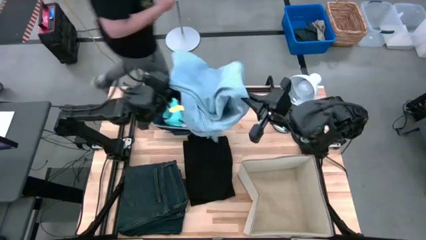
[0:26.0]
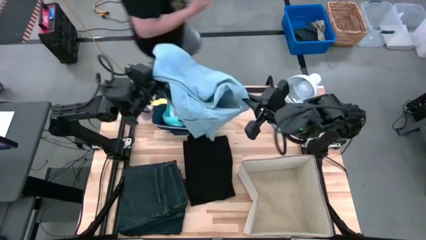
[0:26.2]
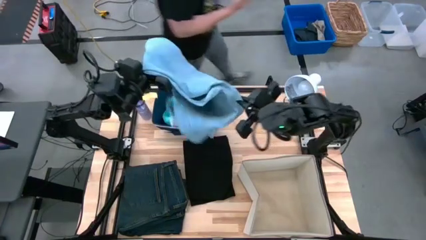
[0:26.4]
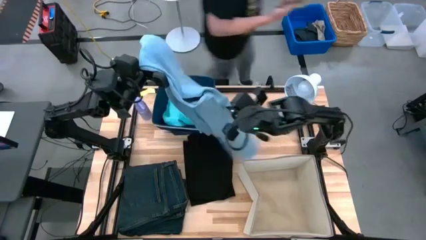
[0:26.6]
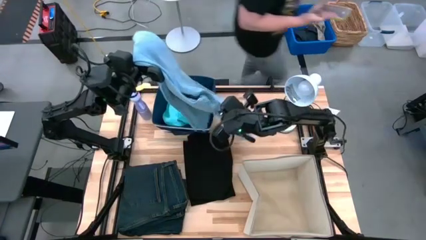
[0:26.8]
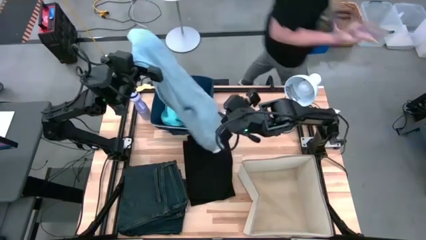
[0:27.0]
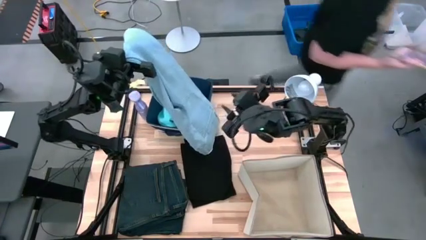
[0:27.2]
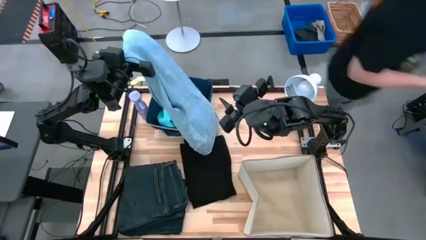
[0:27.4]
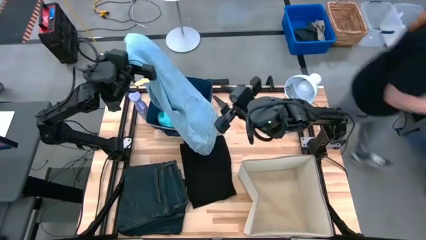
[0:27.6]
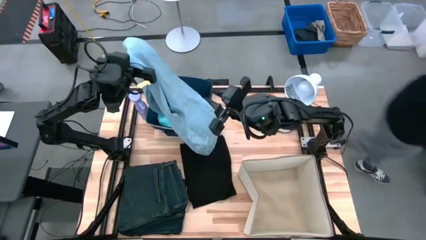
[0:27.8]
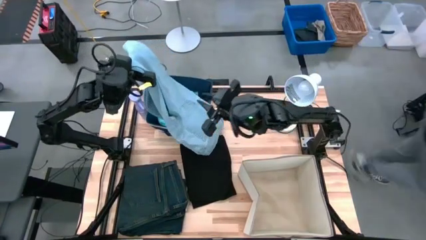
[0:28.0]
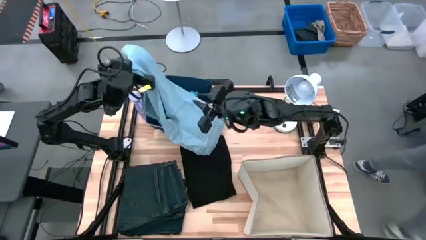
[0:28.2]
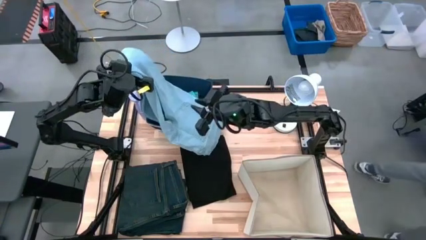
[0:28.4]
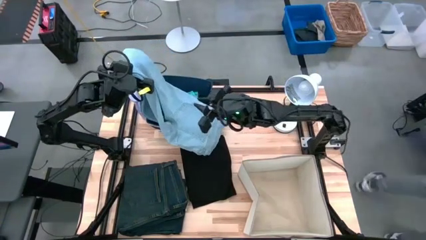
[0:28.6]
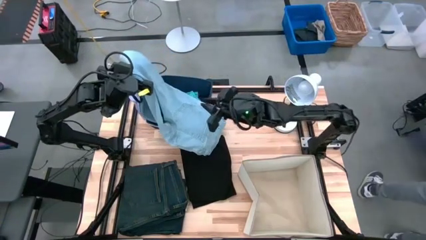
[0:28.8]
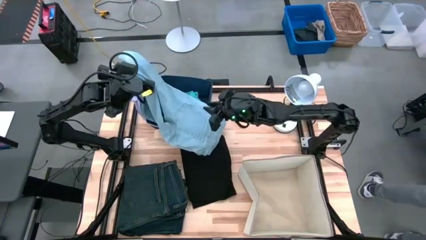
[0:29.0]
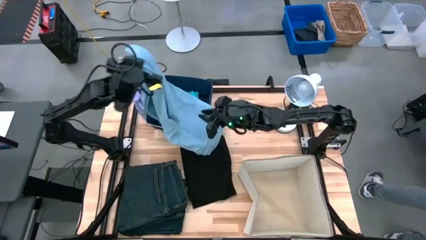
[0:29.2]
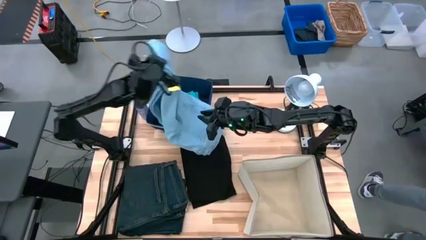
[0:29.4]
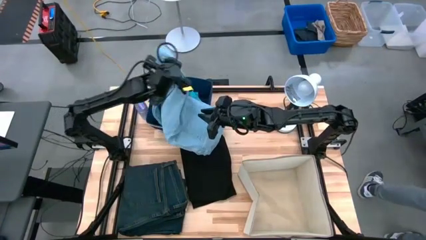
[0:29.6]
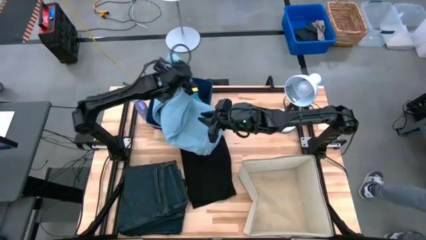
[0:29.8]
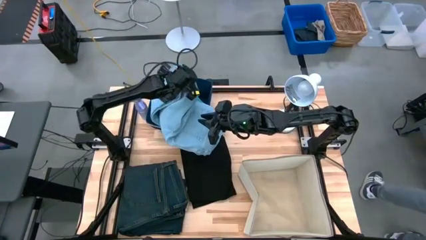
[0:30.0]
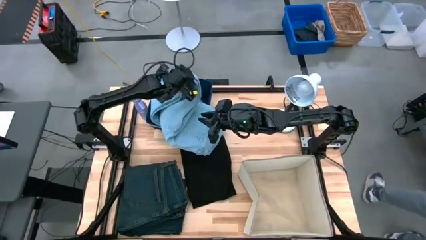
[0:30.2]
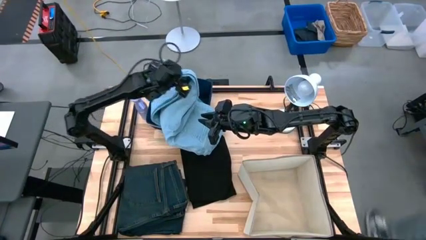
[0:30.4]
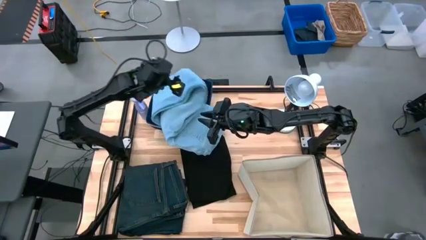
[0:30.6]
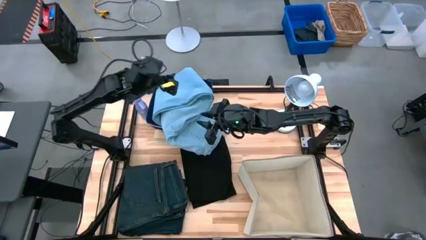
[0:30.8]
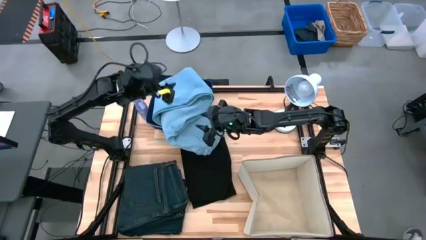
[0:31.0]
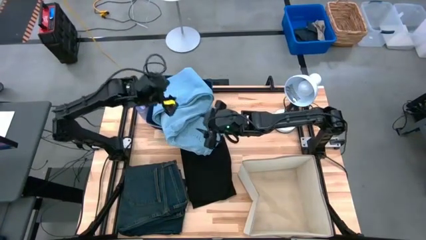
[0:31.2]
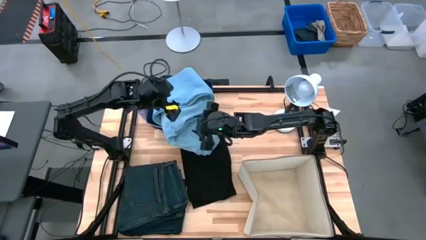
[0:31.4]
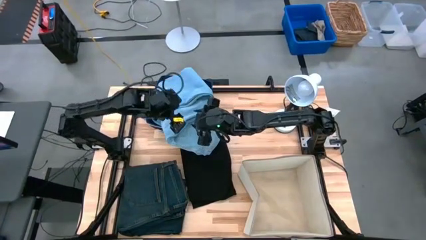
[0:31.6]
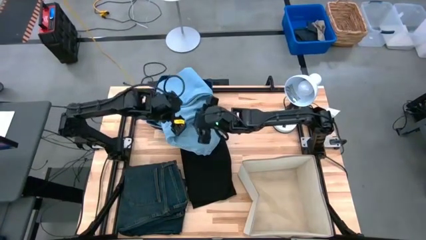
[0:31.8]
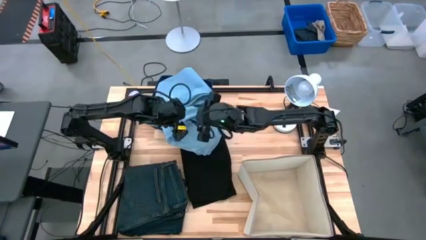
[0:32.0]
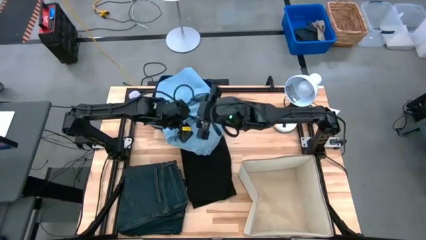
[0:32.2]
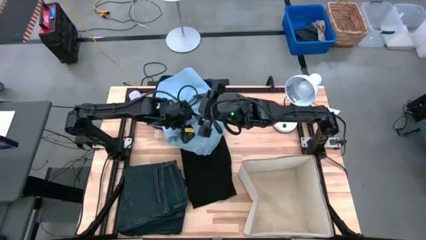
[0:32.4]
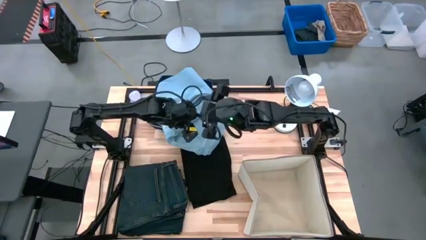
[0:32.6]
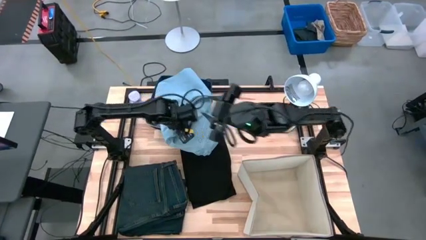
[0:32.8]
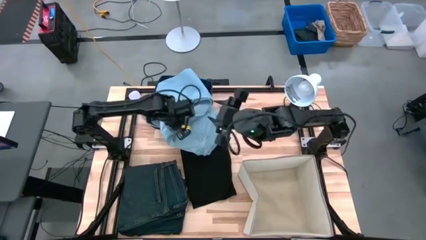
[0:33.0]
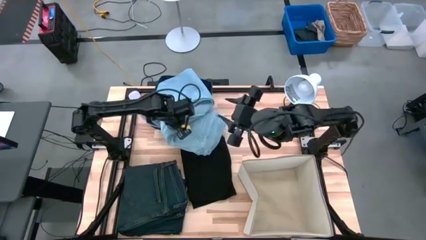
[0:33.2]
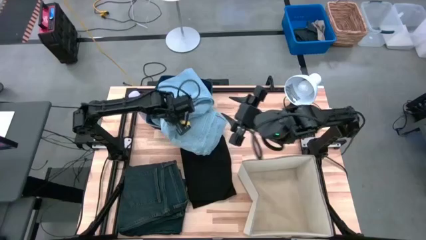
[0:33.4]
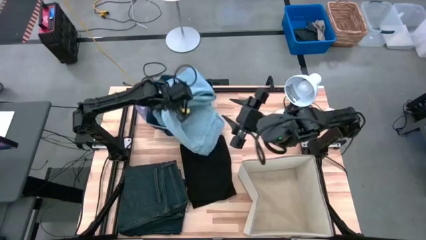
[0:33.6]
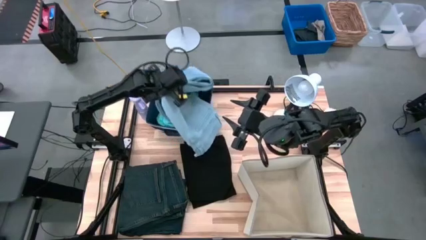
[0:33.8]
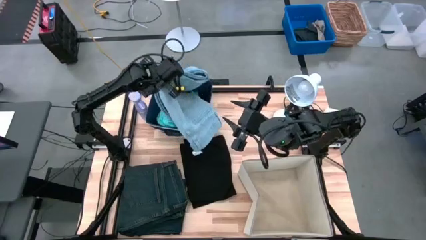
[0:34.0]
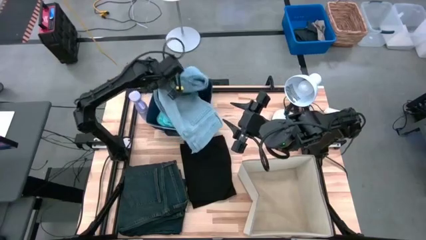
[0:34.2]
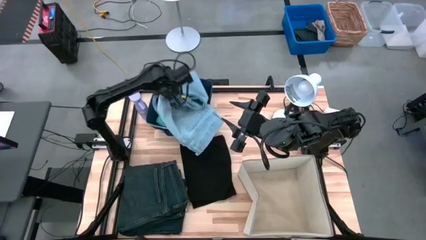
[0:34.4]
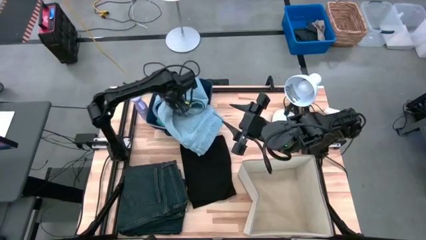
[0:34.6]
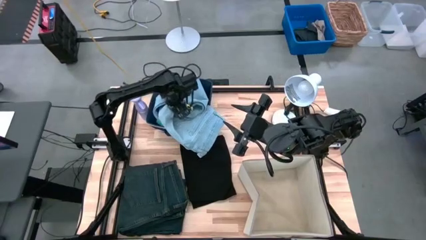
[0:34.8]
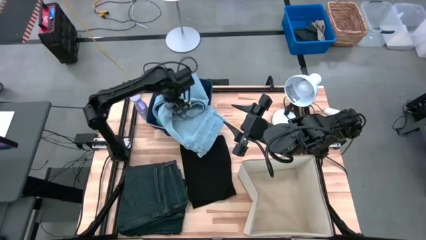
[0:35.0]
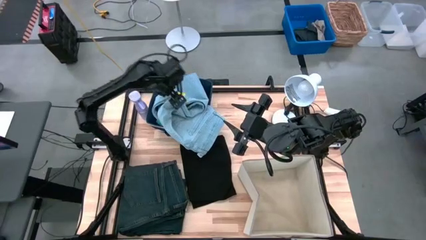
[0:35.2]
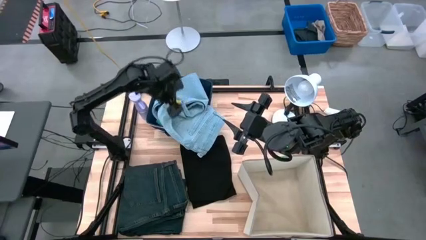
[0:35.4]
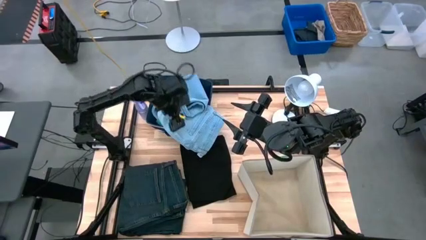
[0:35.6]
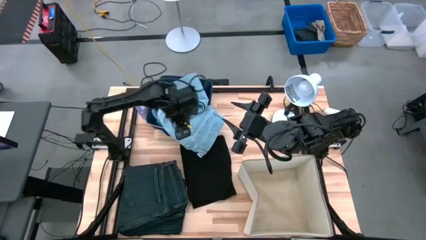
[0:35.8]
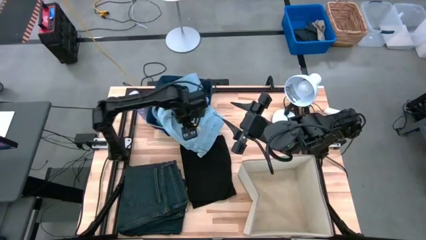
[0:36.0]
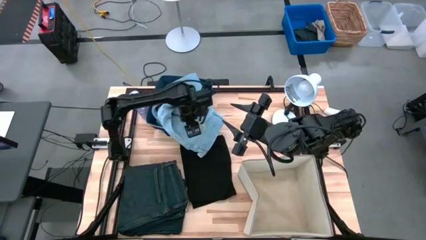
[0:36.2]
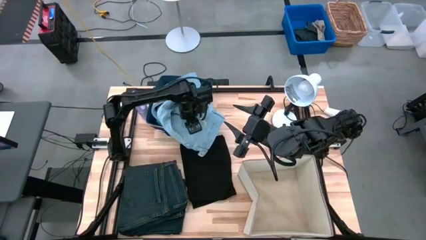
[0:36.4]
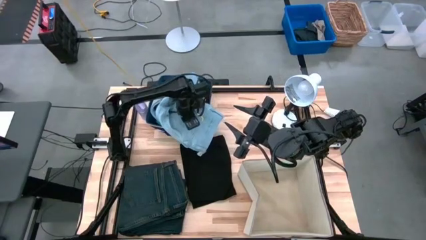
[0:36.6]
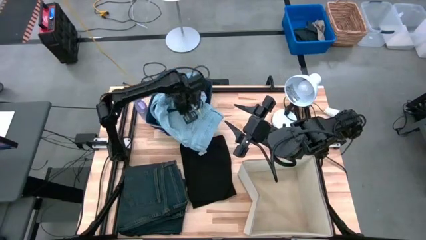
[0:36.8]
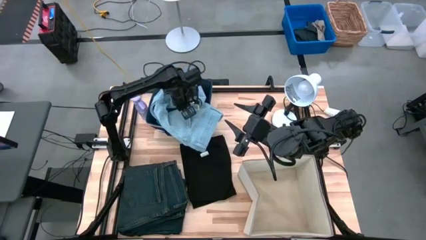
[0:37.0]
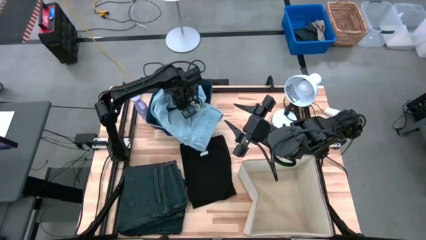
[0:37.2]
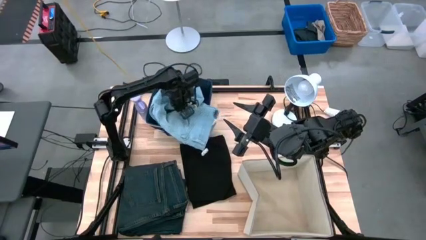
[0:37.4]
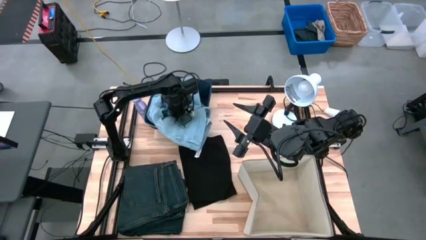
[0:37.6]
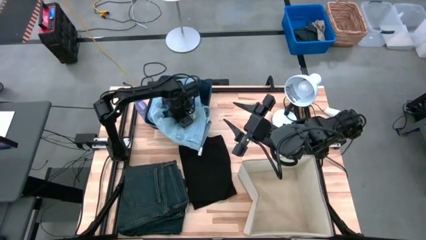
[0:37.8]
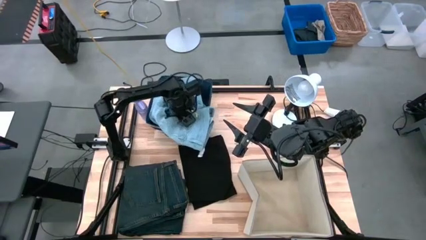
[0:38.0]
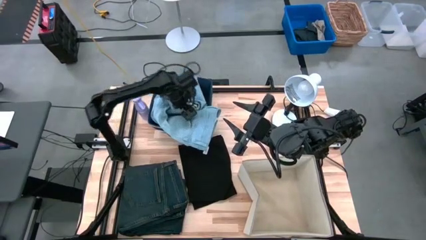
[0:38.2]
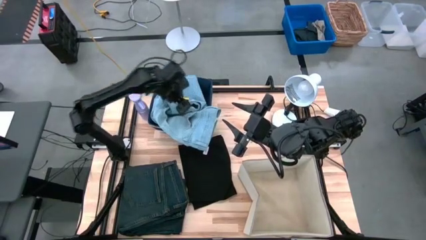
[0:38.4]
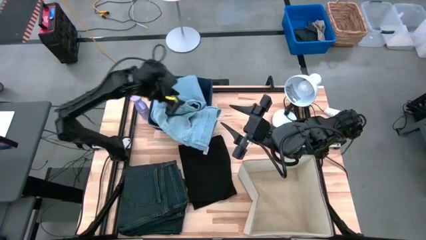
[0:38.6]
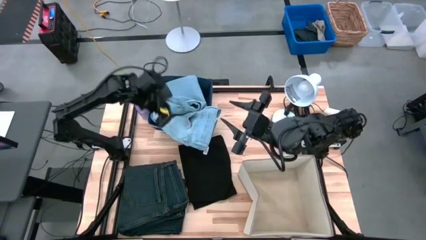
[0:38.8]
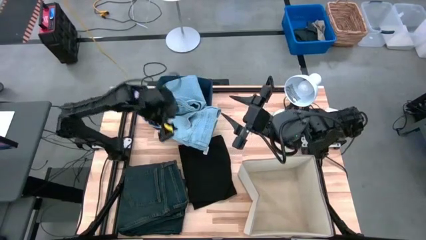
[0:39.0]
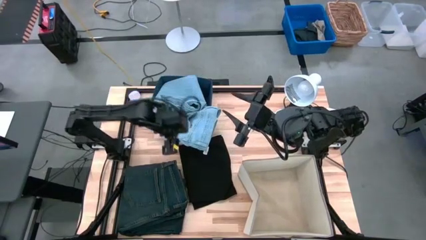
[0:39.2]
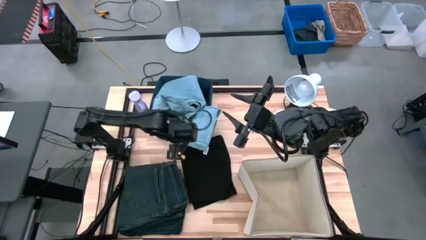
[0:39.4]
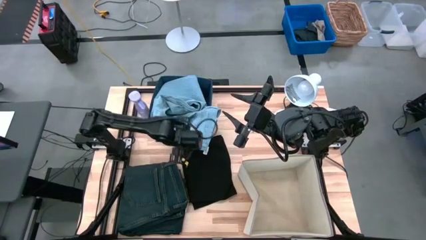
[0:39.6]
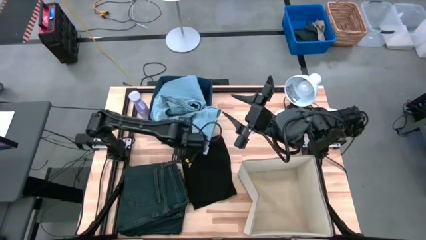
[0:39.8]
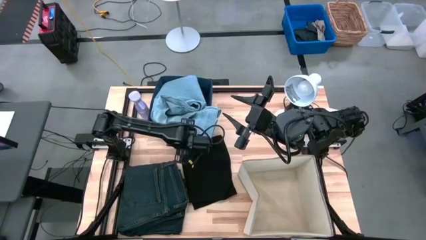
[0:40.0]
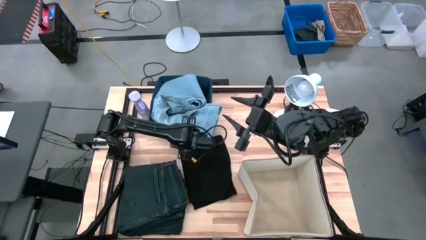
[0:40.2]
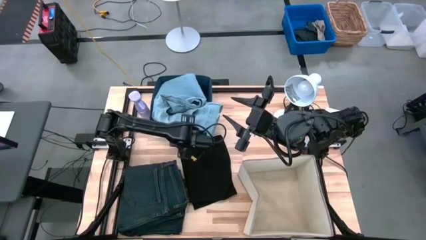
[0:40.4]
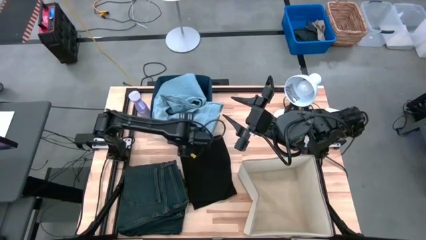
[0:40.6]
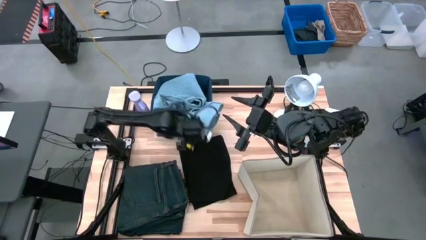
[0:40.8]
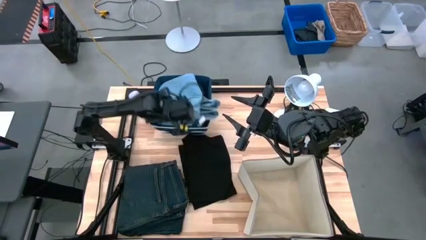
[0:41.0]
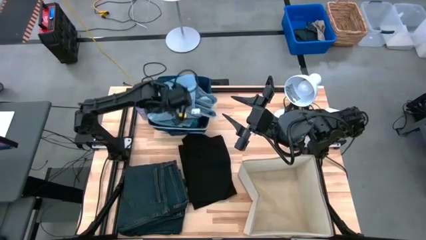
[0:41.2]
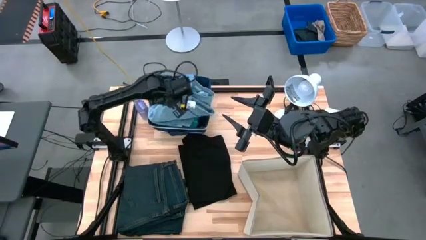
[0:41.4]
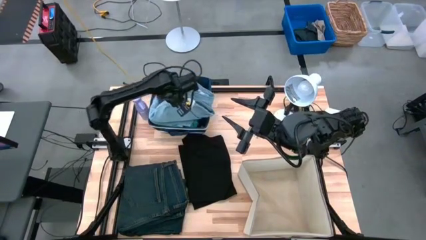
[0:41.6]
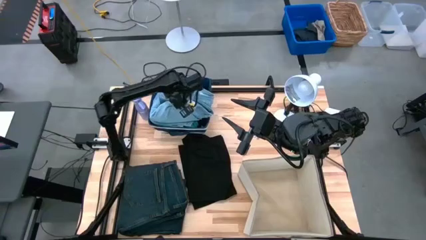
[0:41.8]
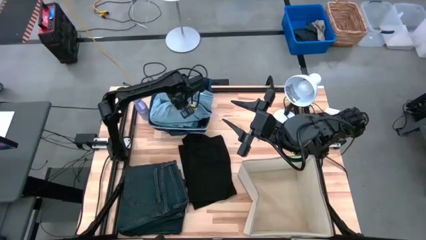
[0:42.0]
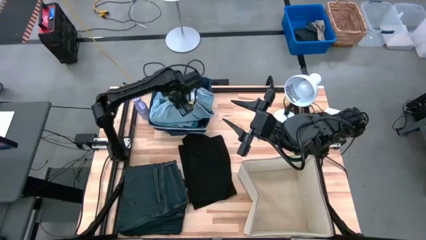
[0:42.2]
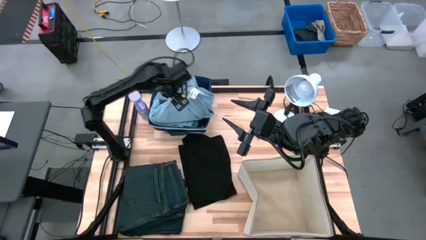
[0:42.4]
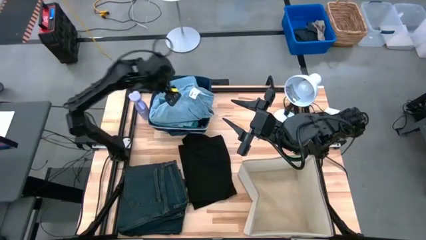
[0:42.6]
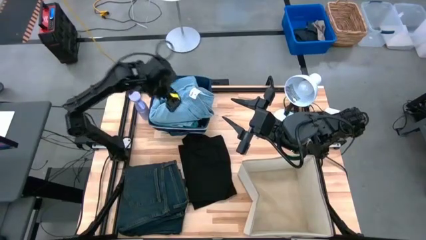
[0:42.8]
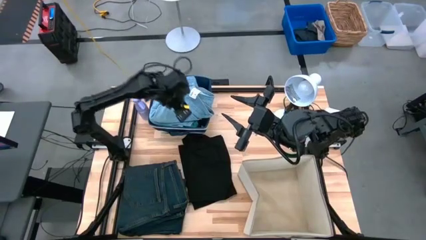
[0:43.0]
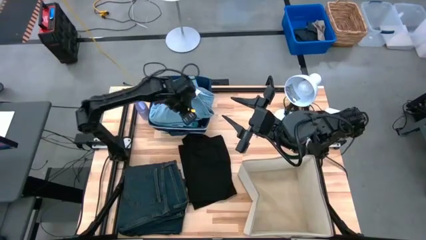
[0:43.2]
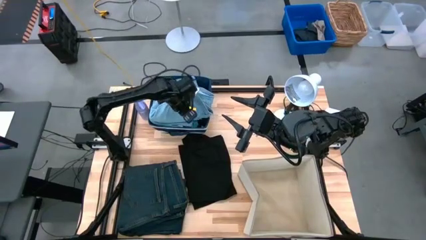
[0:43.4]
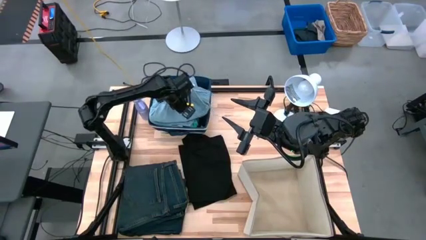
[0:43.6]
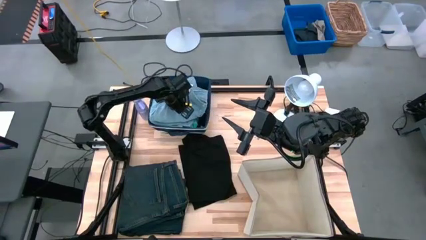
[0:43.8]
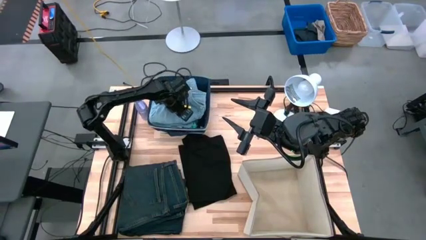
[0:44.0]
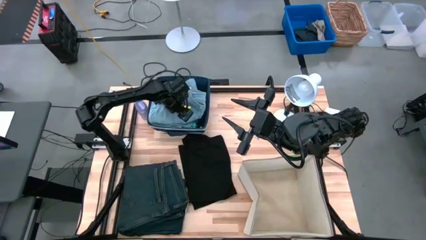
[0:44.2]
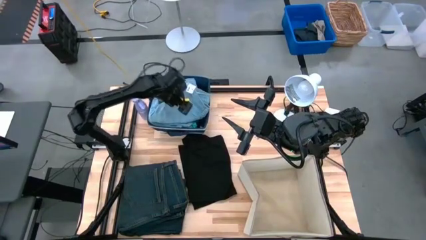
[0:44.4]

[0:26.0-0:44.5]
Task: Sort clothes
Put the gray pants into the blue bin
